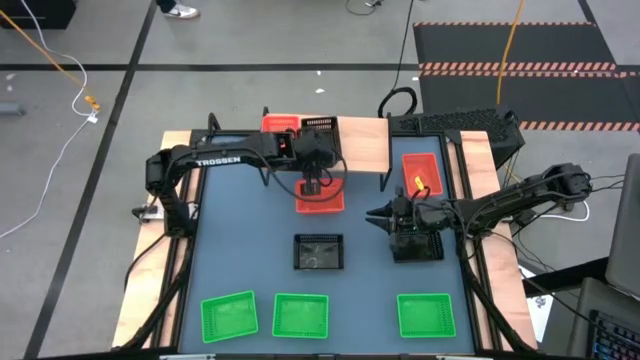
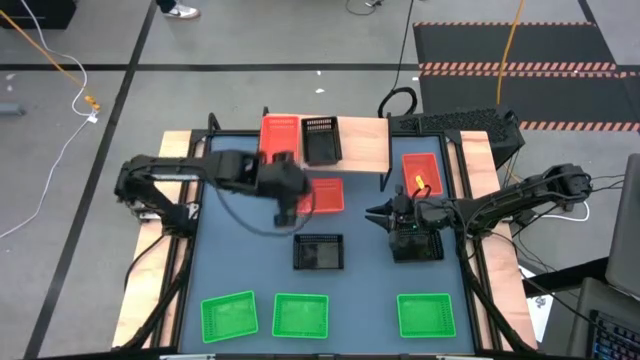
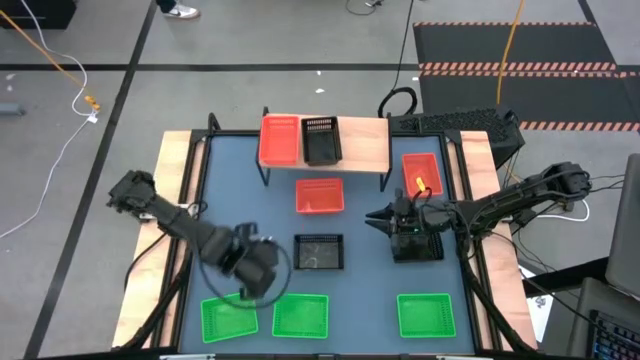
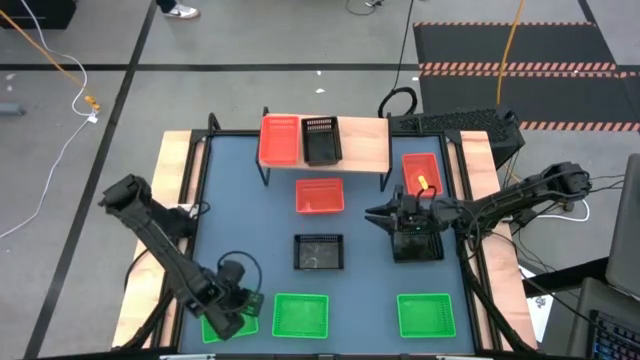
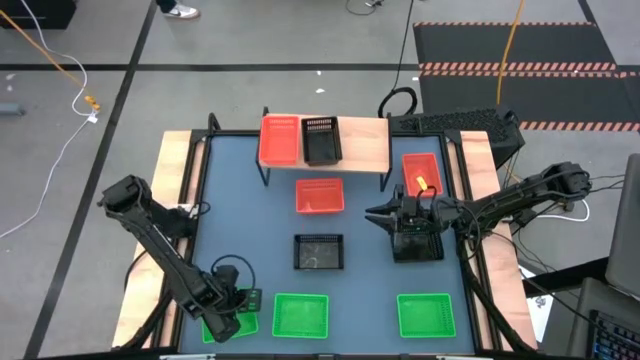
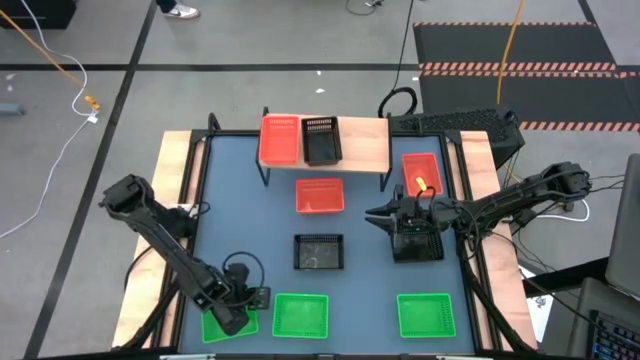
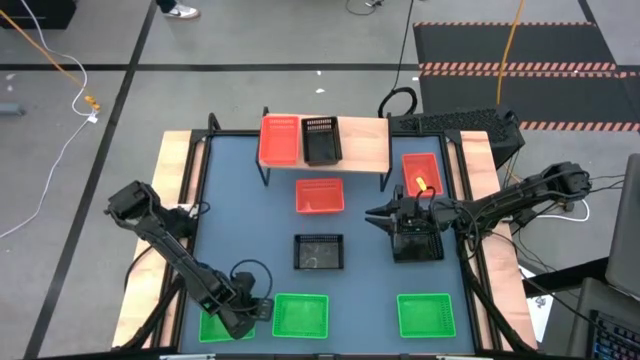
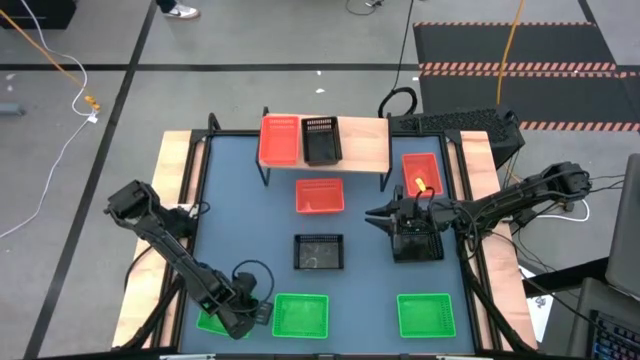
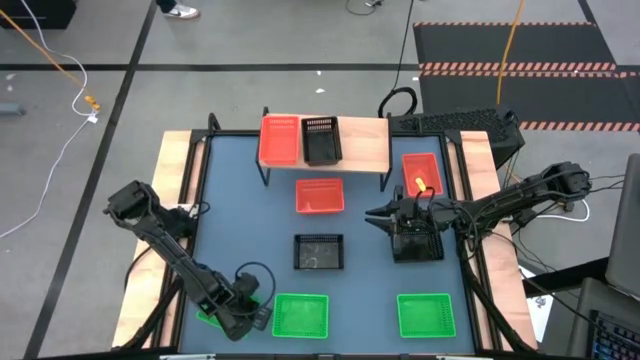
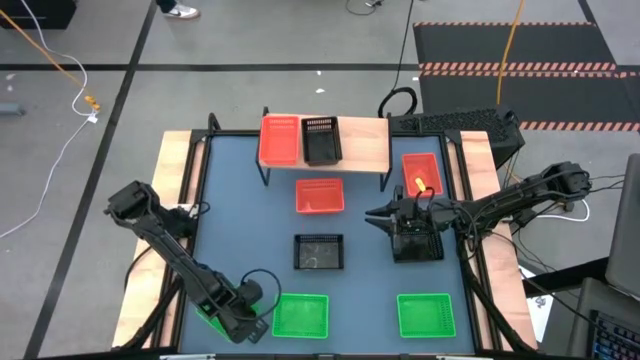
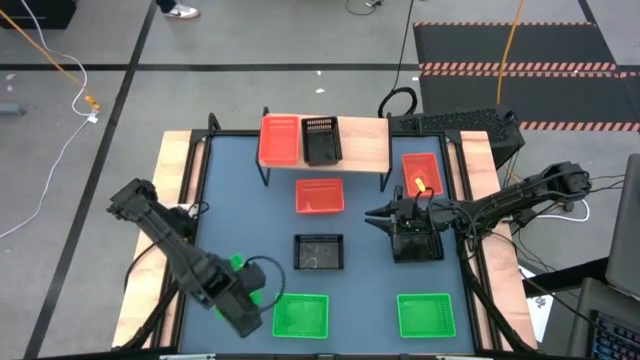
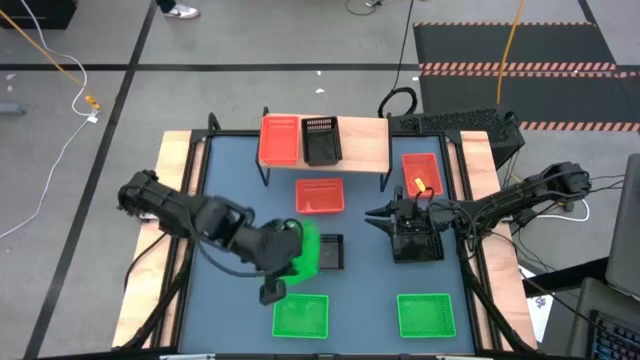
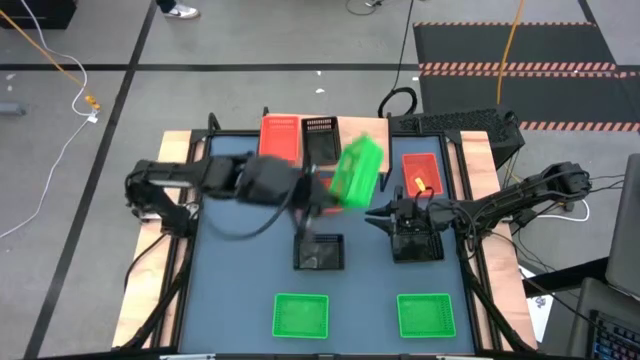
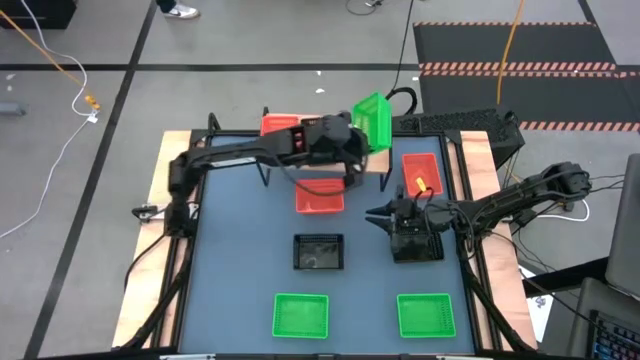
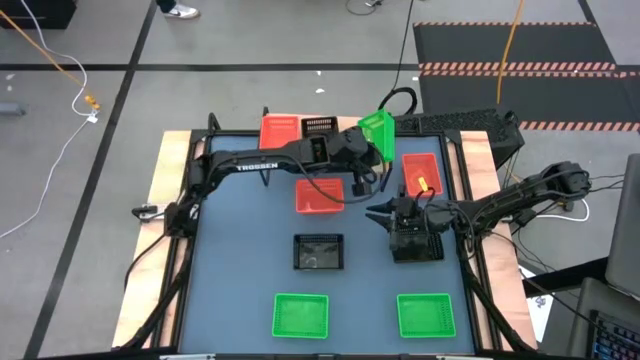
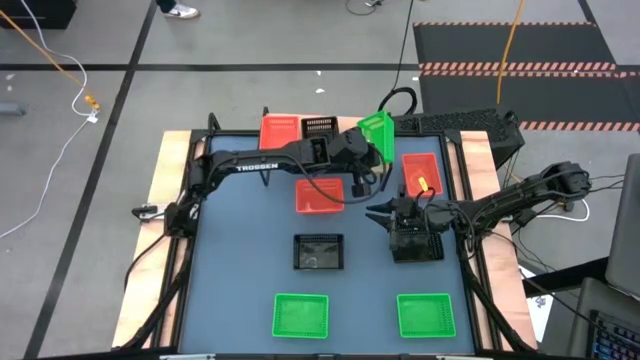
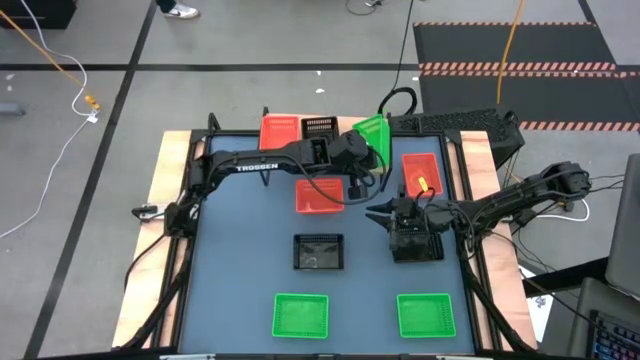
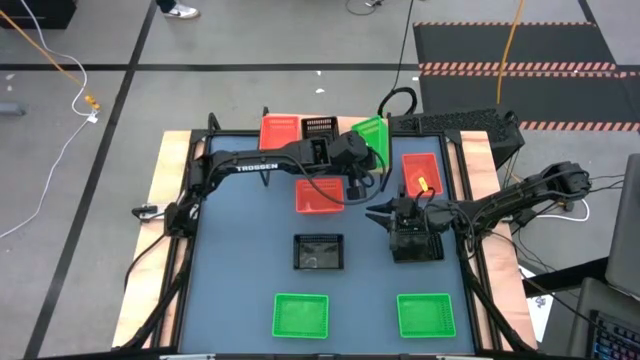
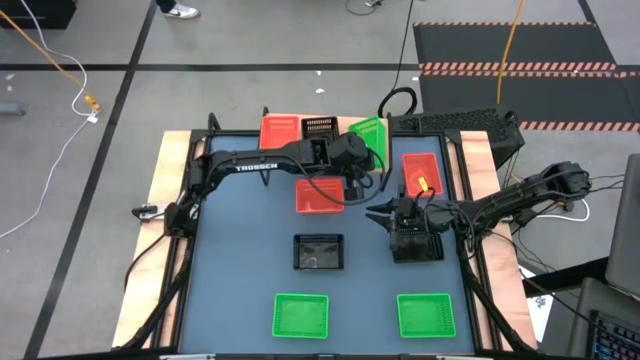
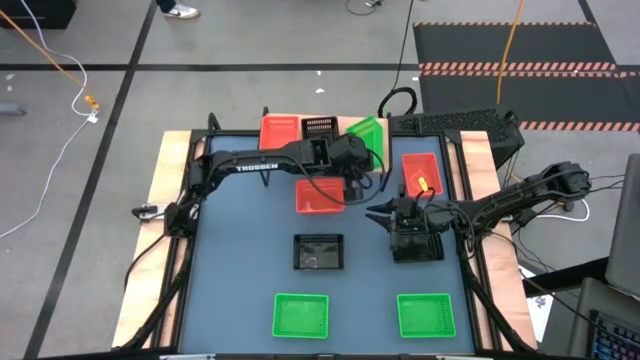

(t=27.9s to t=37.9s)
Task: Stack baskets on shelf by color
Put the left green bin on the shelf

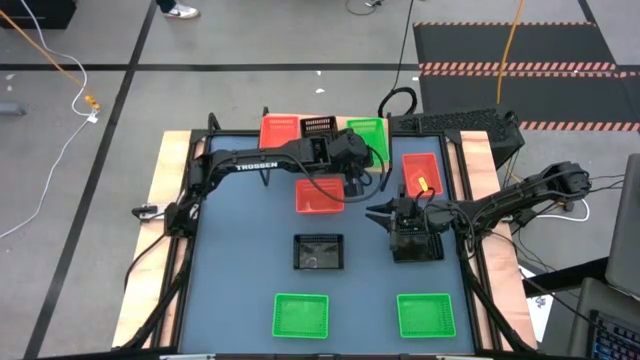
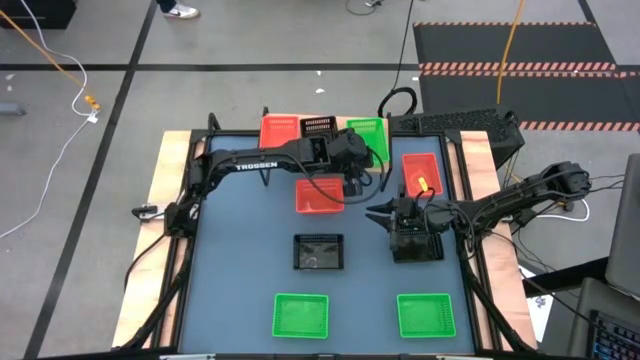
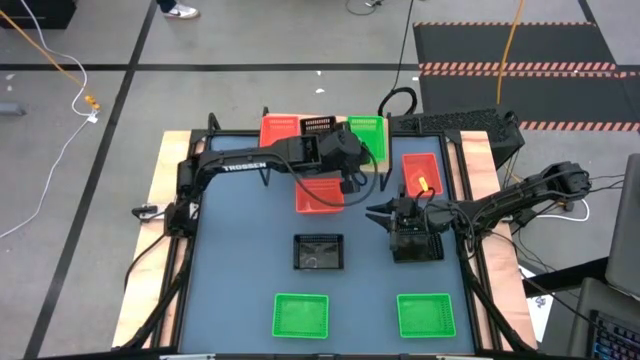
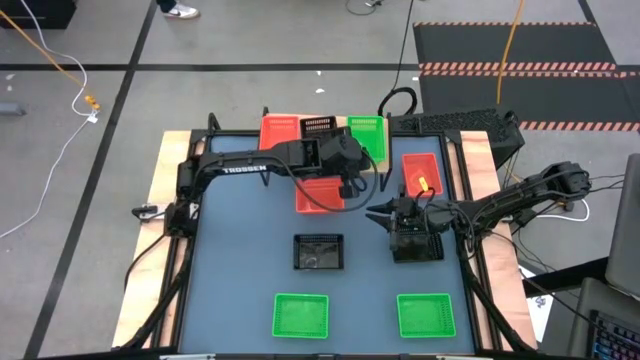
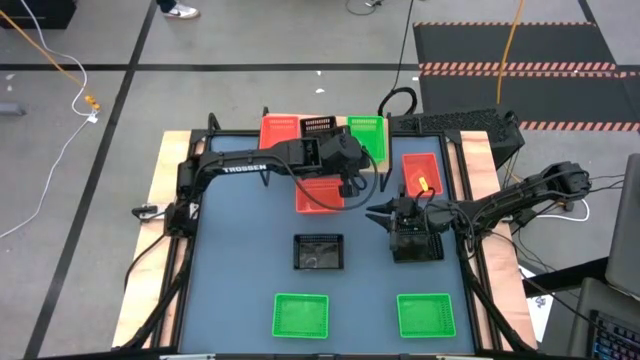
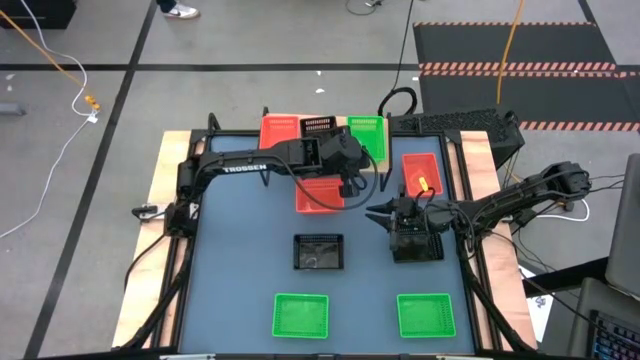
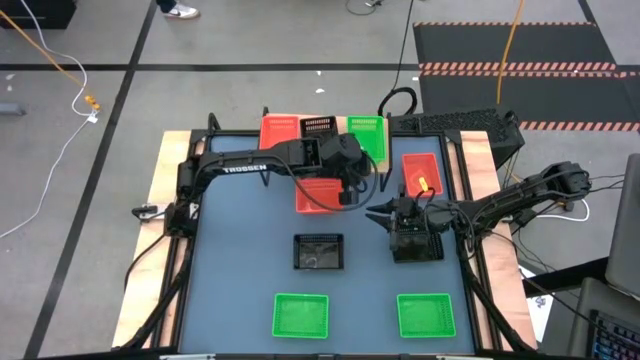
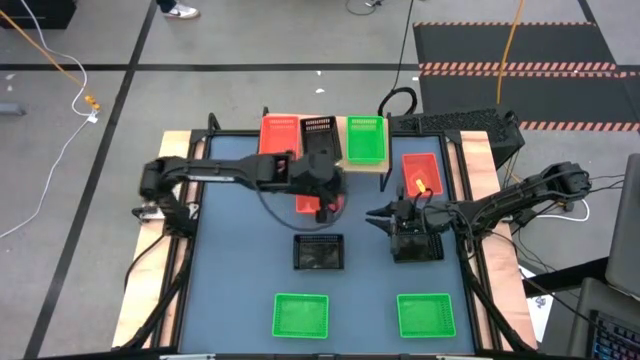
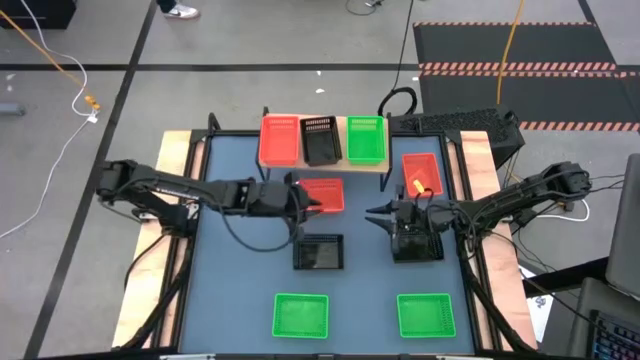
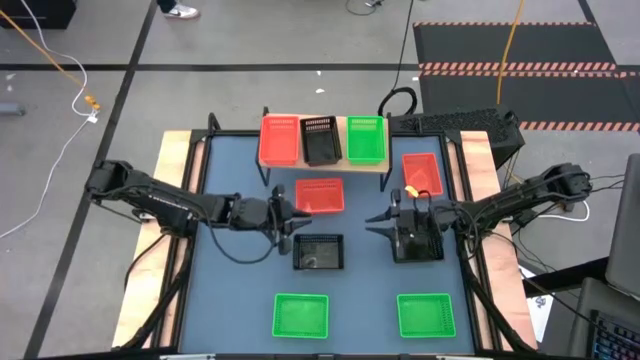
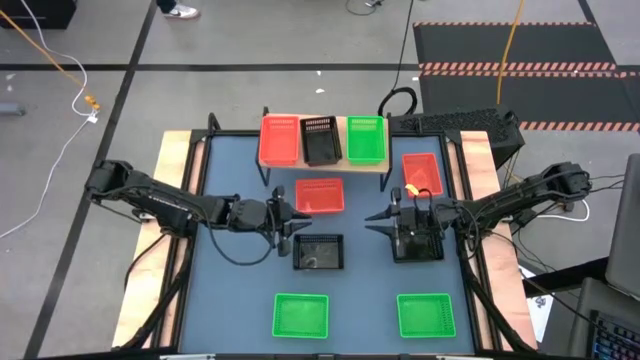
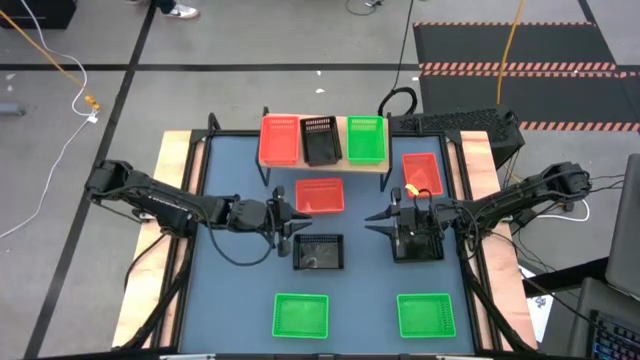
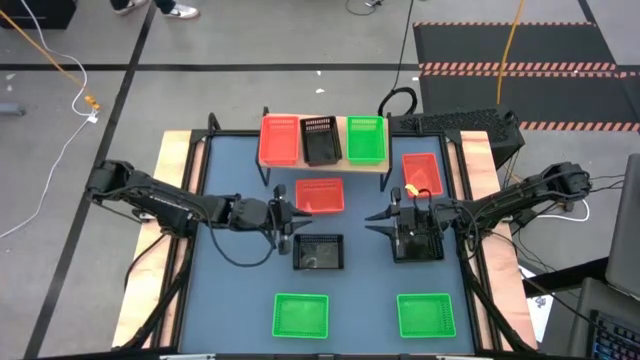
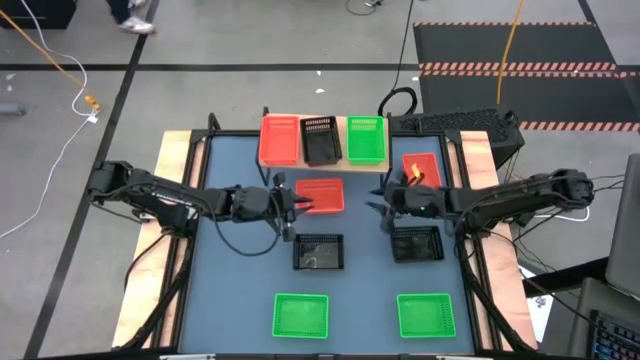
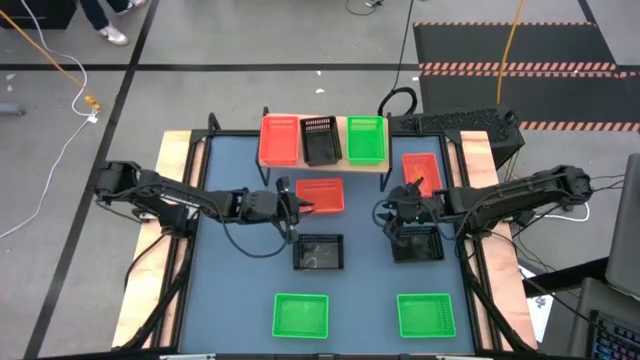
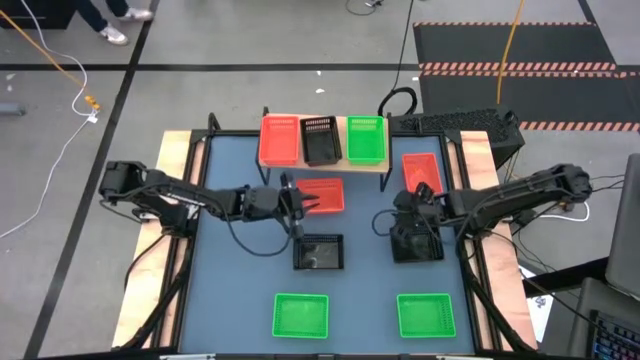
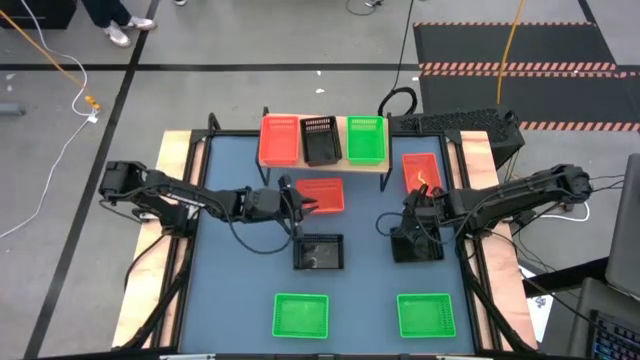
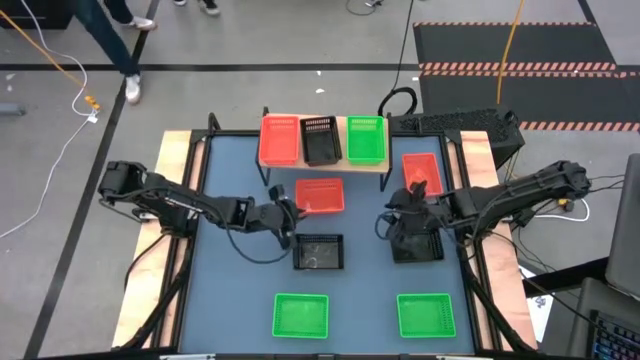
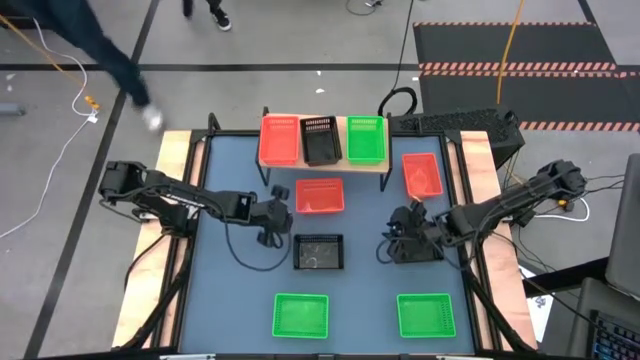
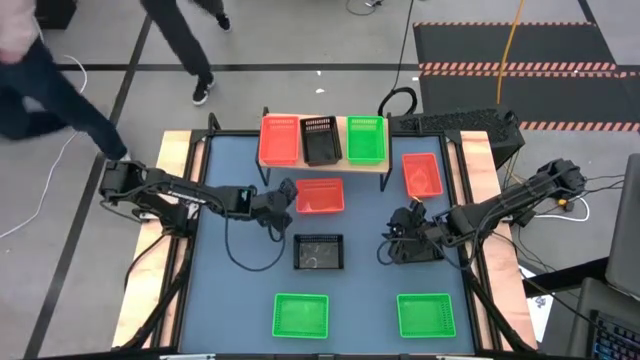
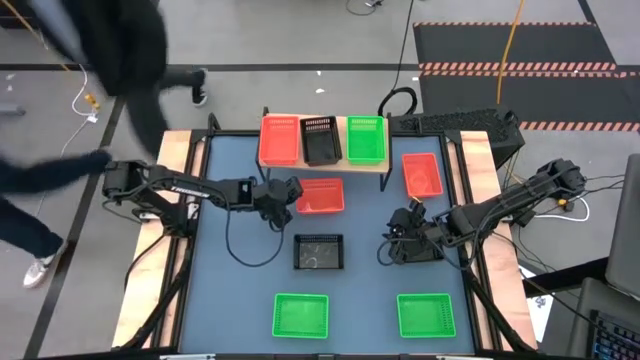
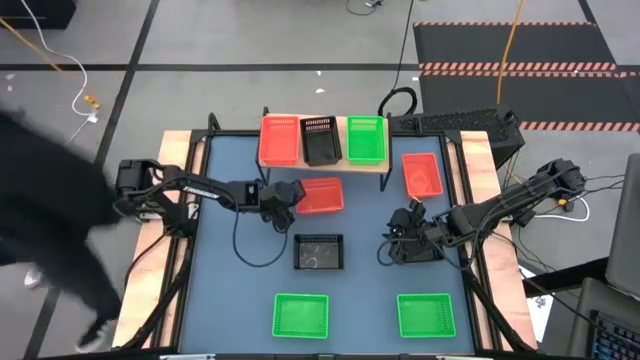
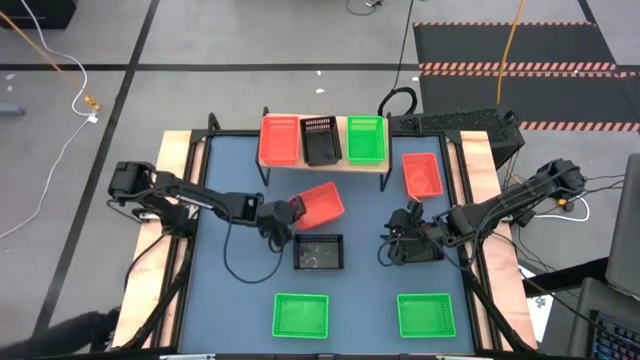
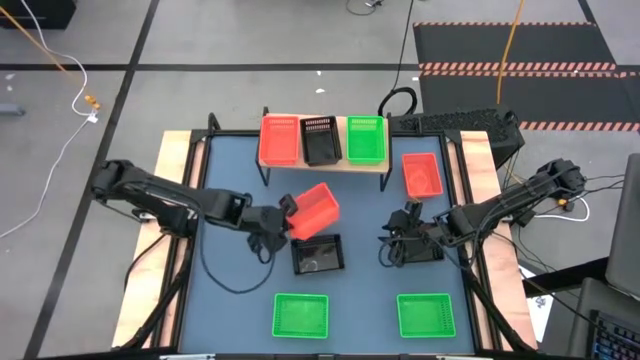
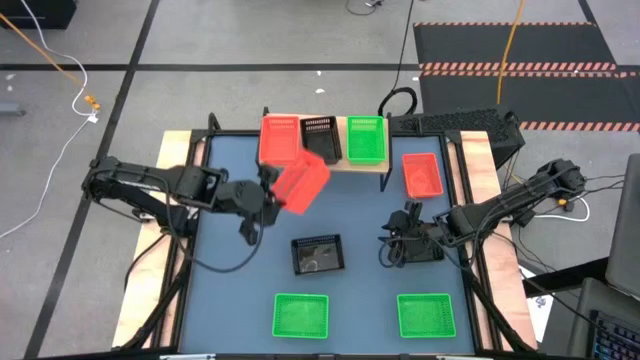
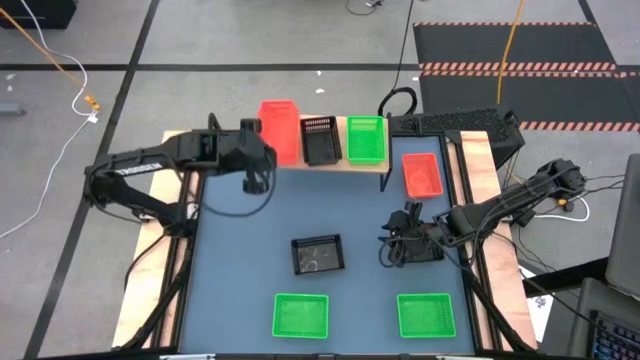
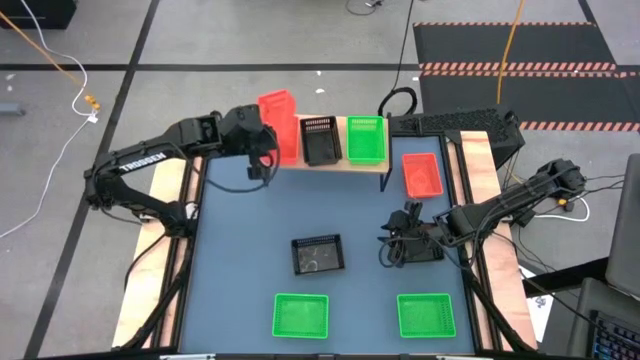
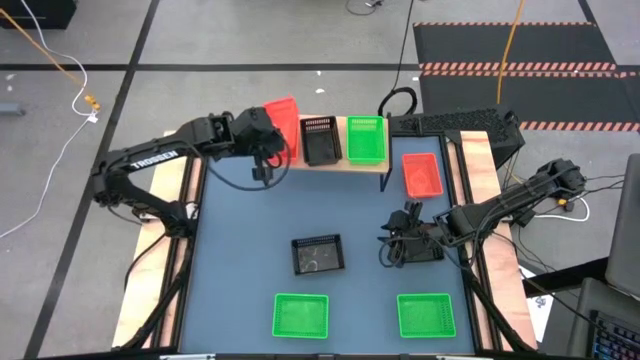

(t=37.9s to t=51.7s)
Stack the left orange bin on the other orange bin on the shelf
